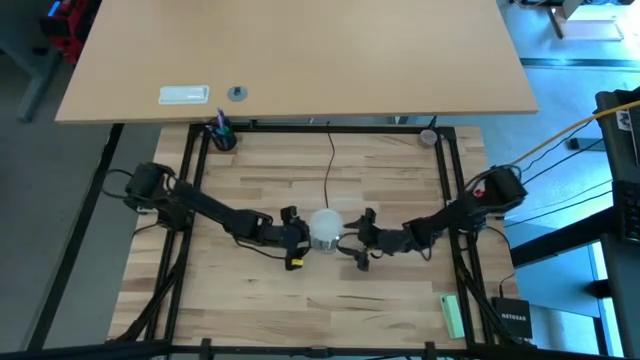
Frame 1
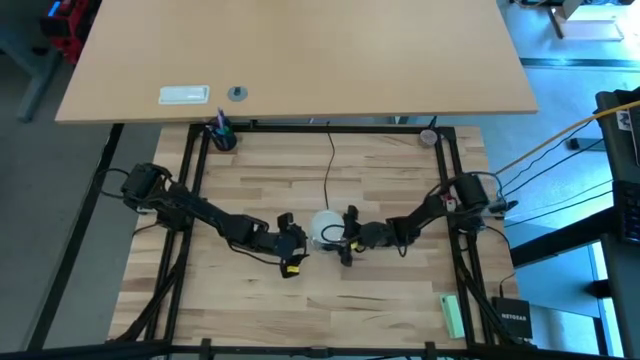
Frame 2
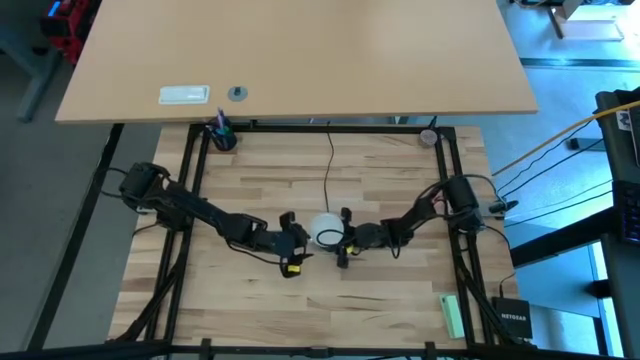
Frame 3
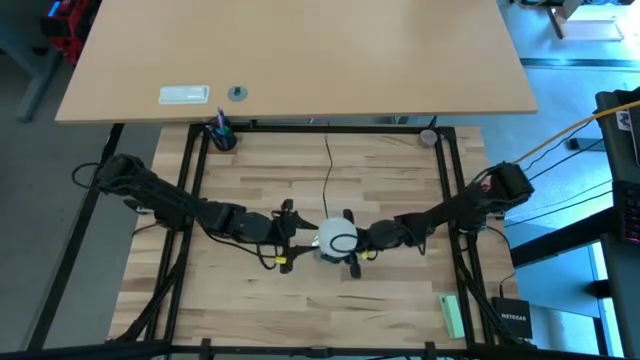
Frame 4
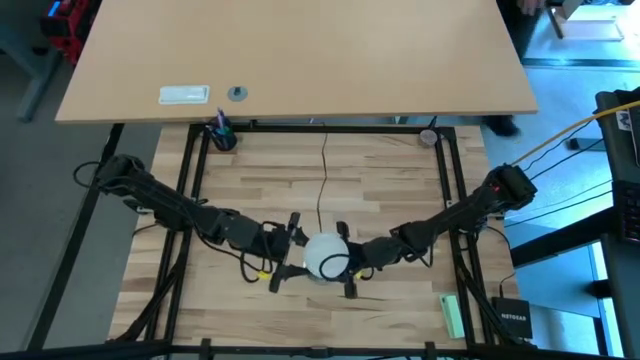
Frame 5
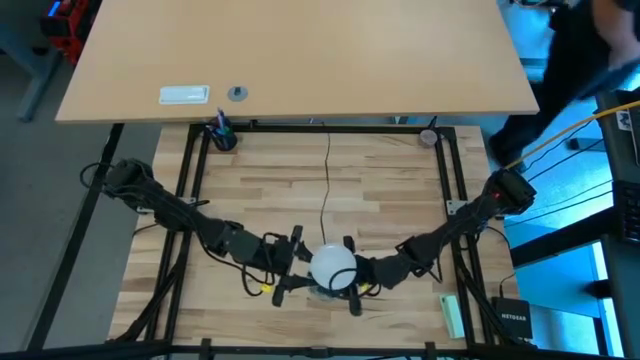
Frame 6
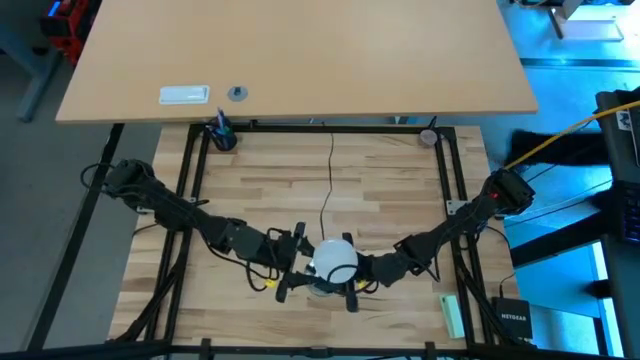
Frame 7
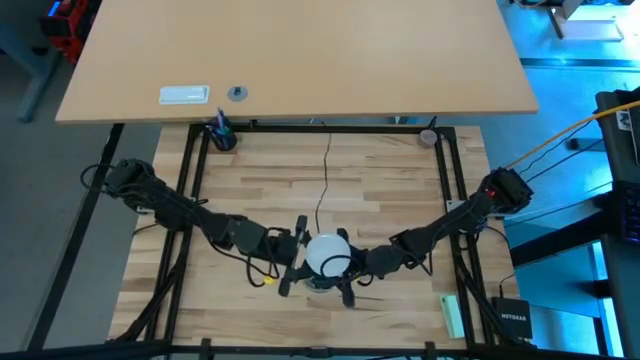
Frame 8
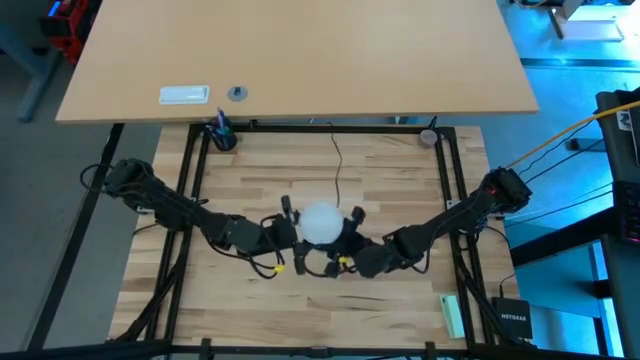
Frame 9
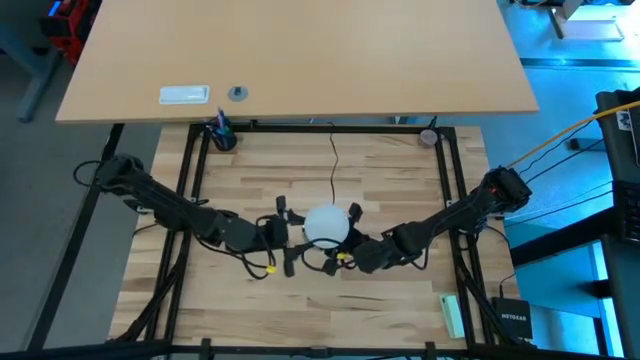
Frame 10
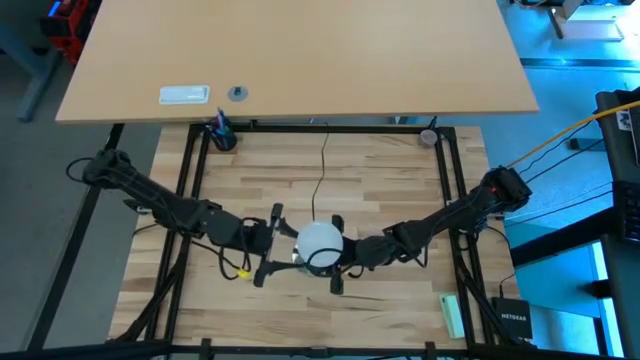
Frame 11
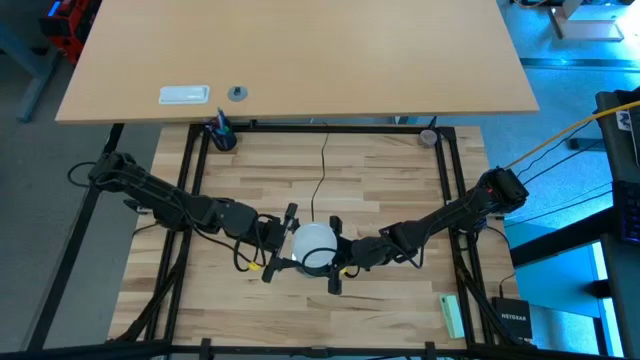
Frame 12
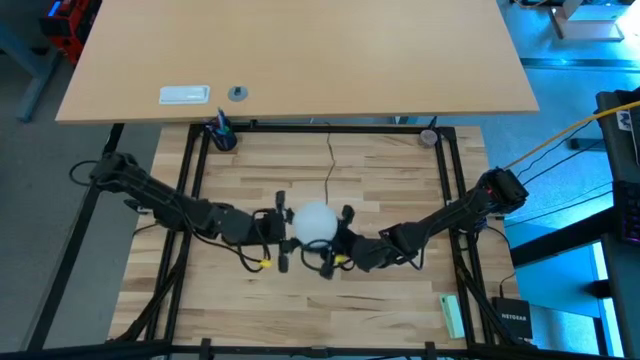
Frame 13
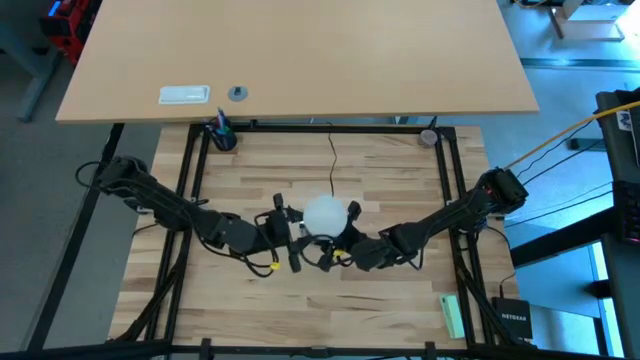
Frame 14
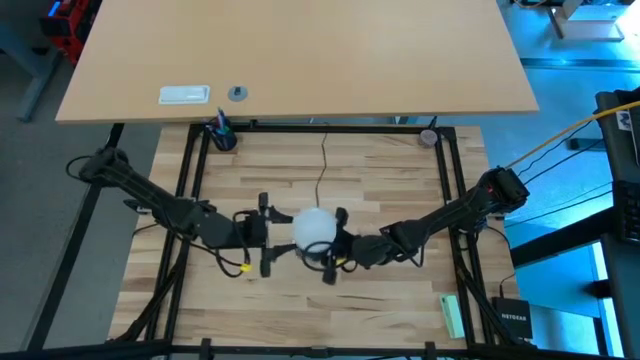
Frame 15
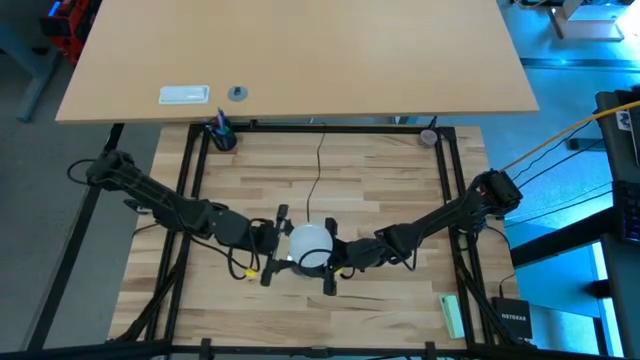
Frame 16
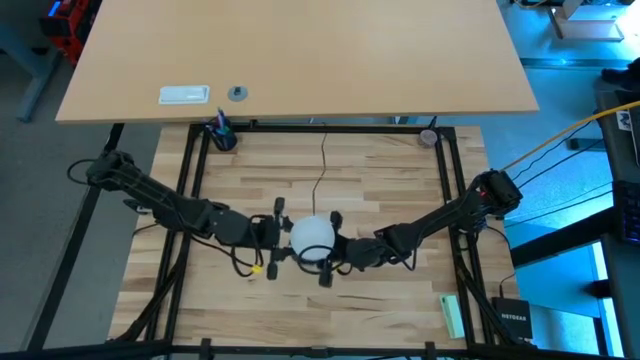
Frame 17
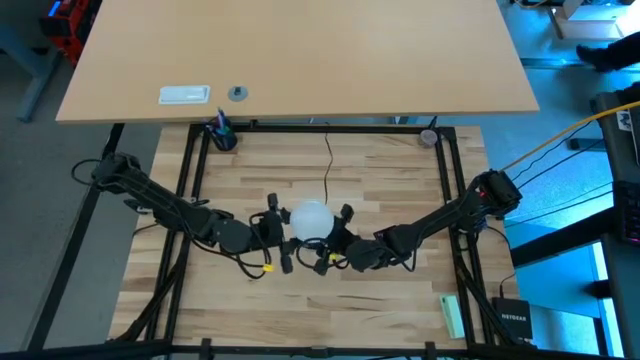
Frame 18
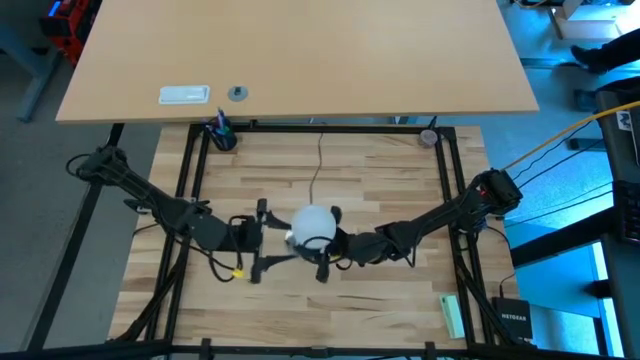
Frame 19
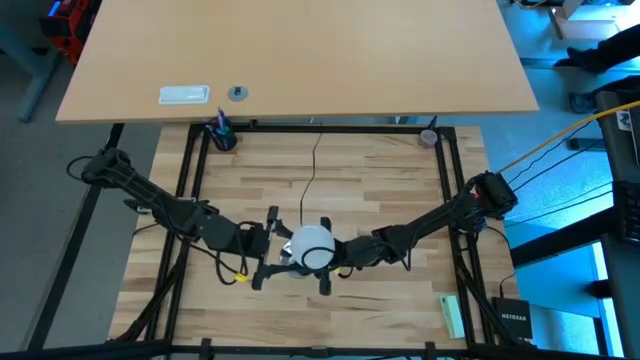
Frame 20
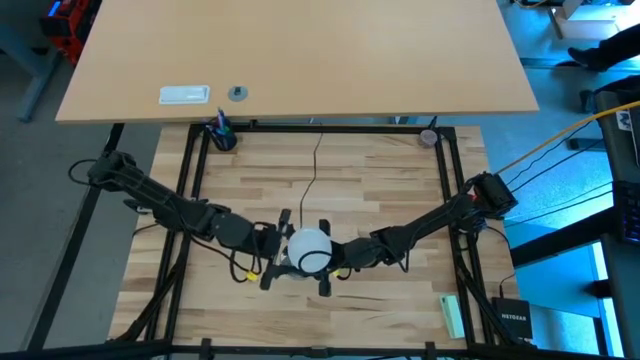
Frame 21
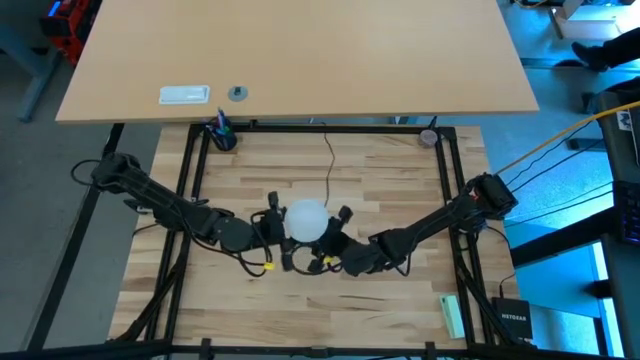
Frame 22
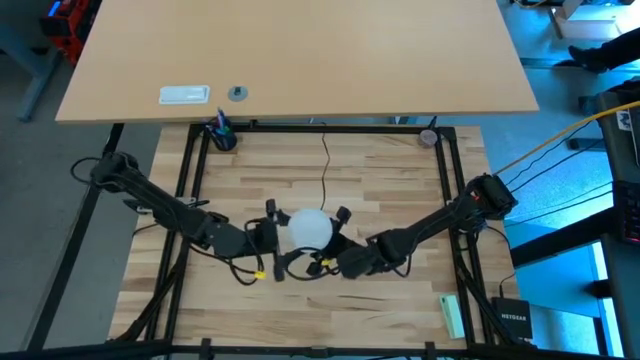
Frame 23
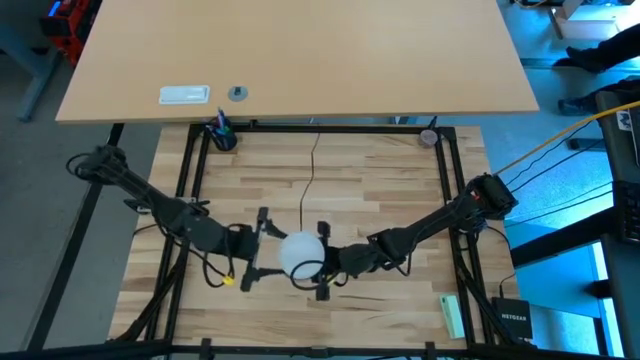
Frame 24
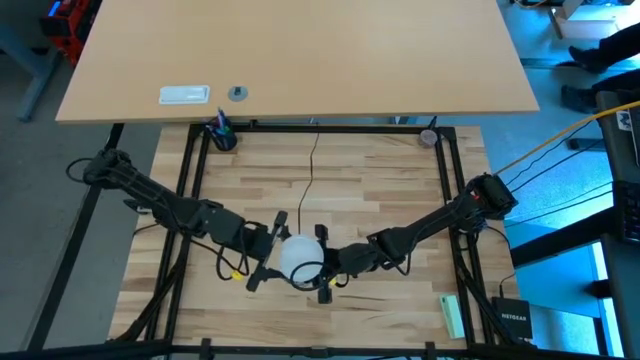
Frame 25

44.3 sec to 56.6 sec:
Task: Screw lightbulb
Remove the lightbulb from the lamp

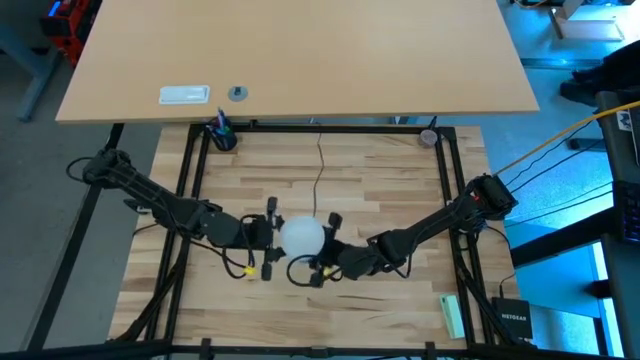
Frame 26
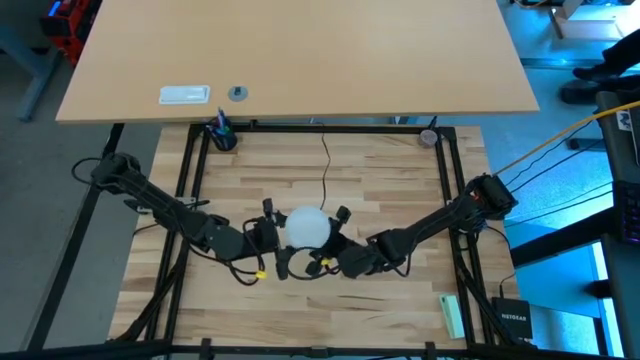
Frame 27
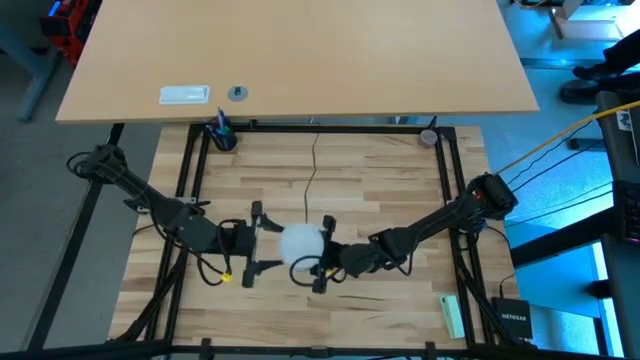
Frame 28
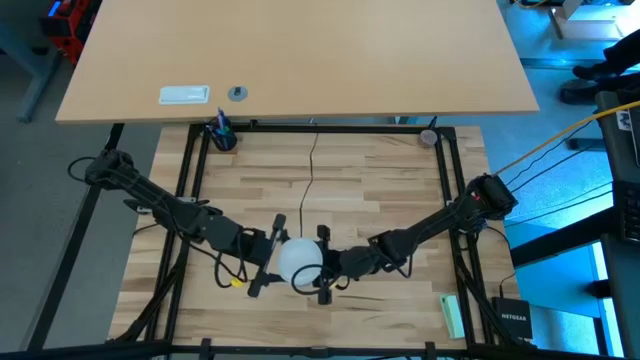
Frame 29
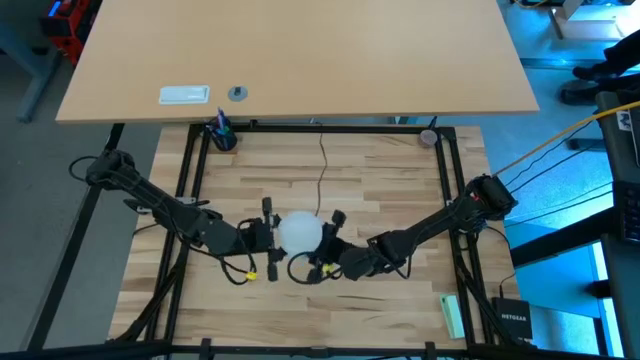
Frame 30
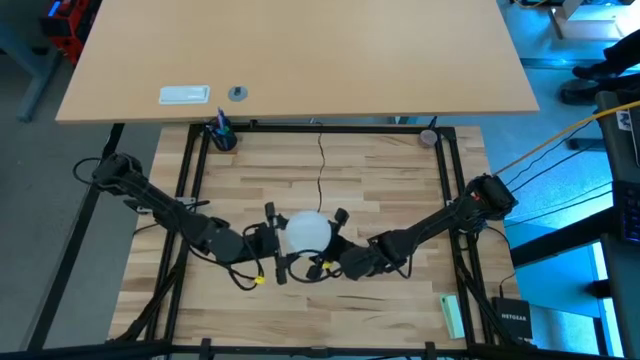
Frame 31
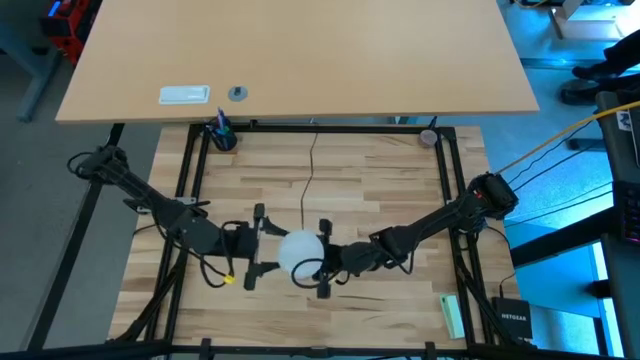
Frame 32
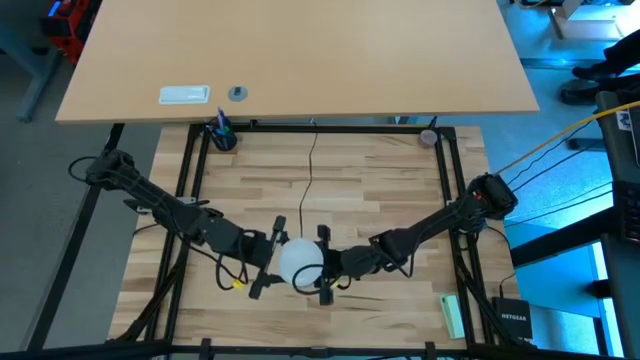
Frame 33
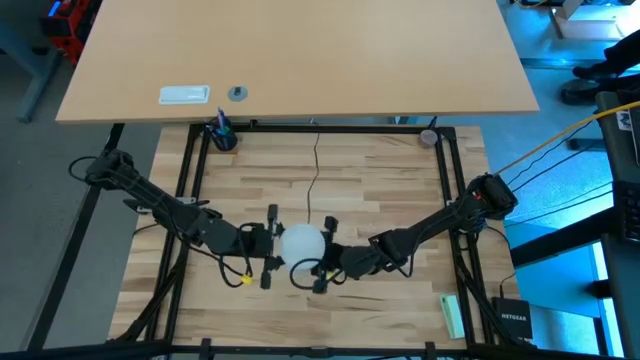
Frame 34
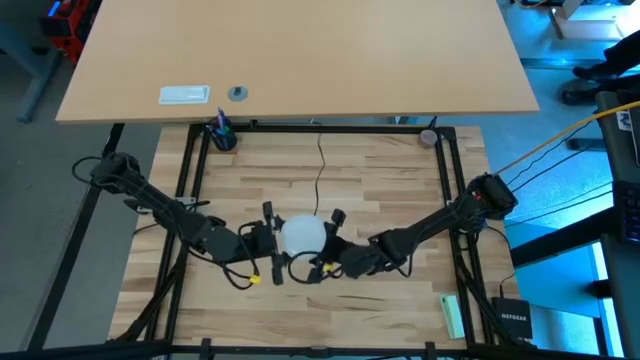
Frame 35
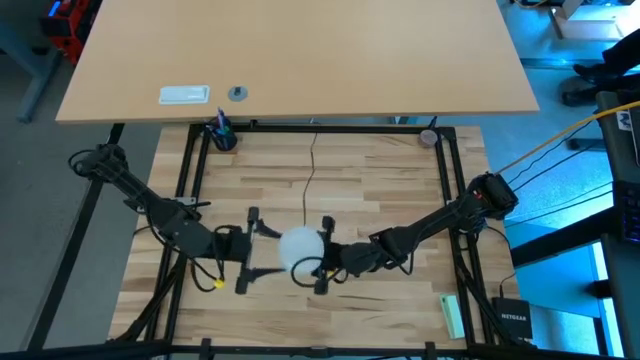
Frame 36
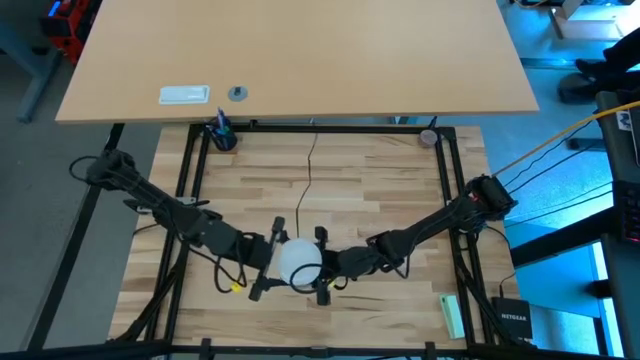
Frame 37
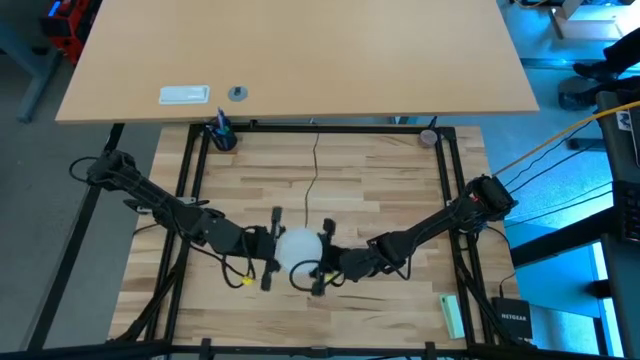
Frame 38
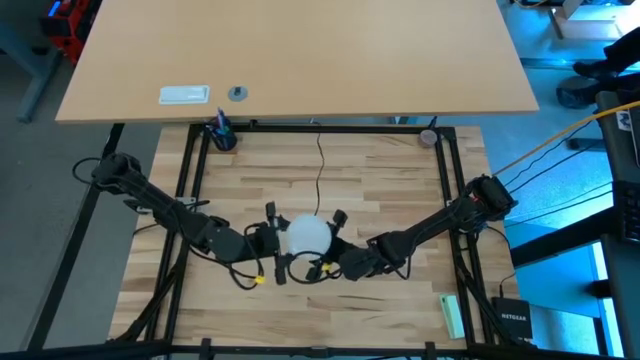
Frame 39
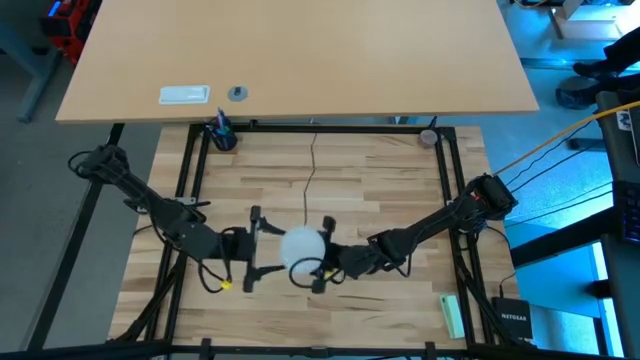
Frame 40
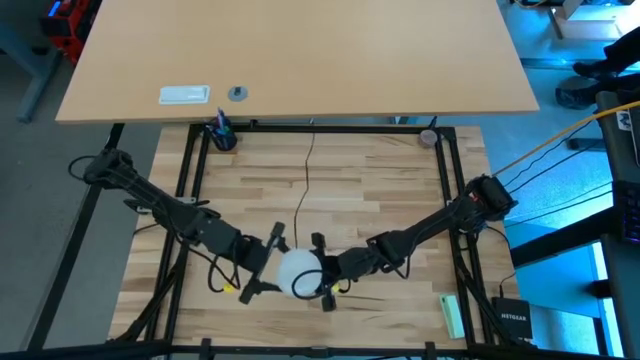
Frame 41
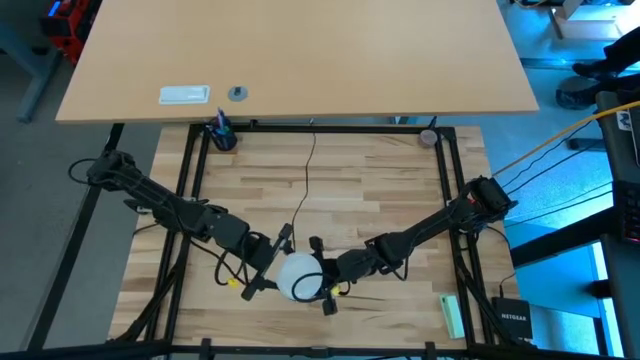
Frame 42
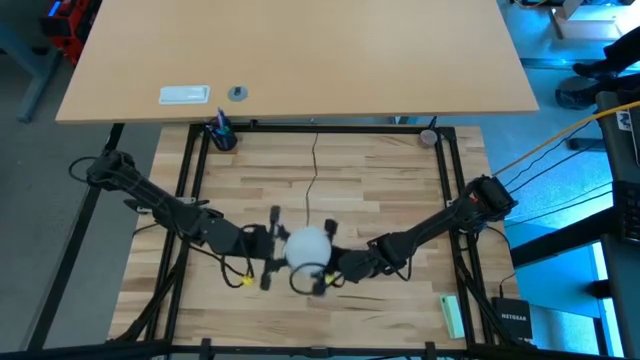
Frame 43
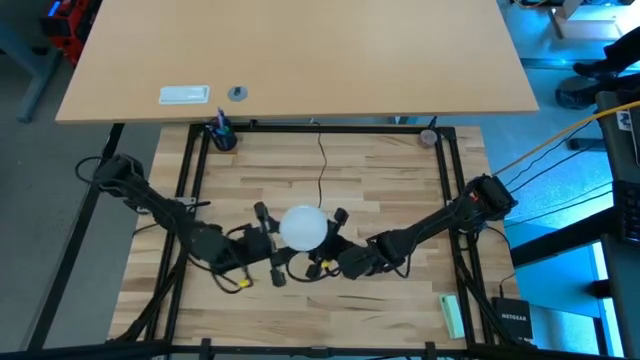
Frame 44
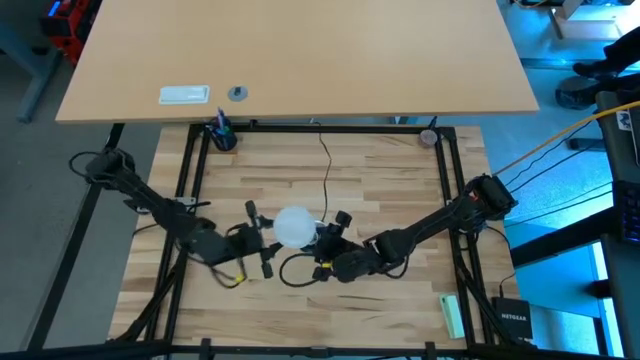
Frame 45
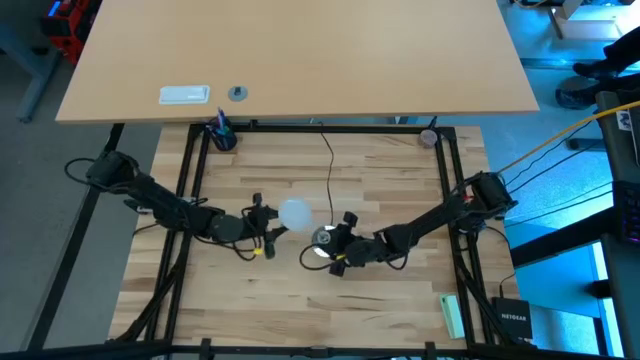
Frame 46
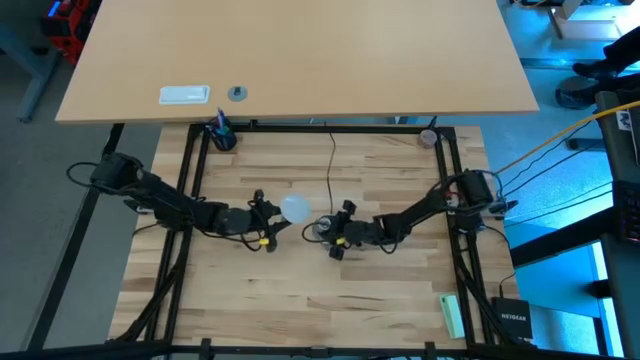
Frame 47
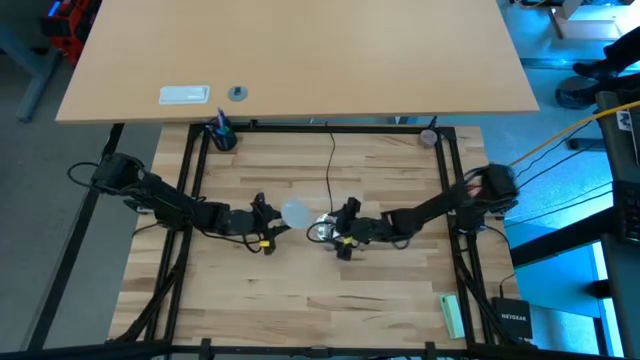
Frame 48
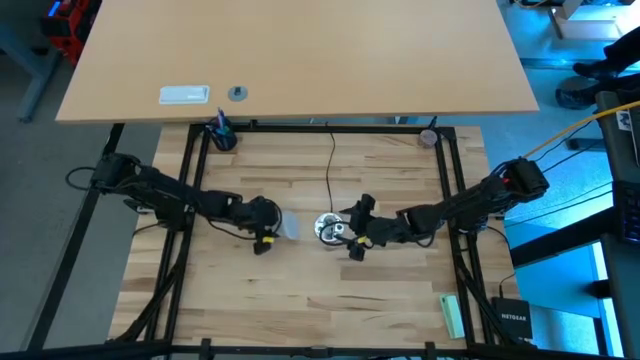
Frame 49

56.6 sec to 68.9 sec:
Remove the lightbulb from the lamp
